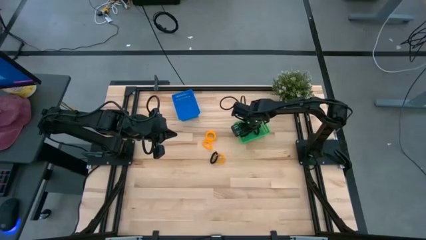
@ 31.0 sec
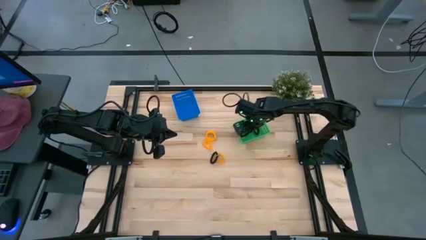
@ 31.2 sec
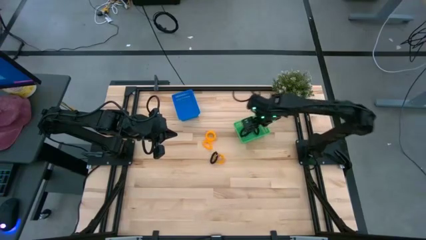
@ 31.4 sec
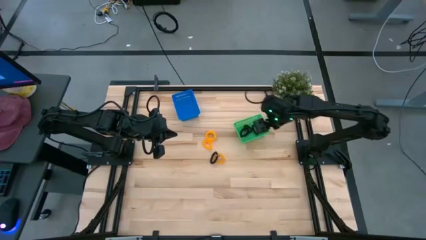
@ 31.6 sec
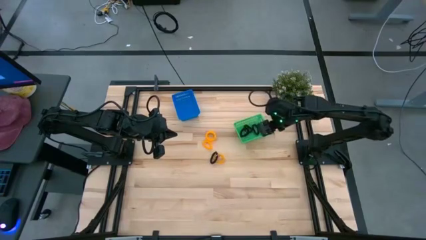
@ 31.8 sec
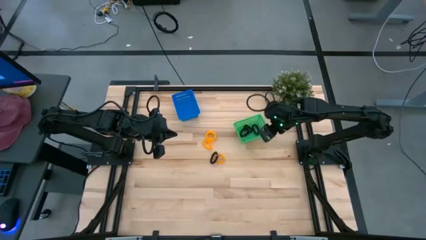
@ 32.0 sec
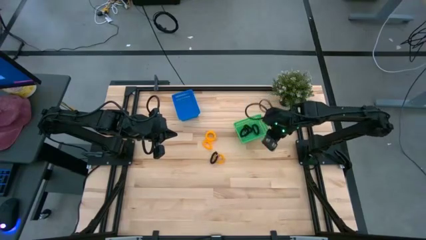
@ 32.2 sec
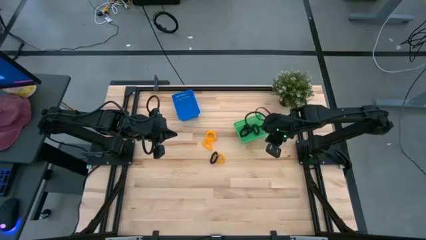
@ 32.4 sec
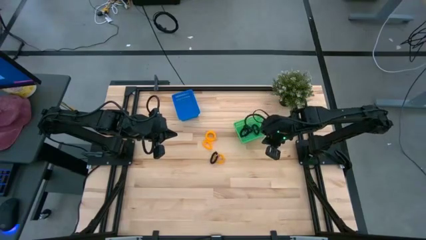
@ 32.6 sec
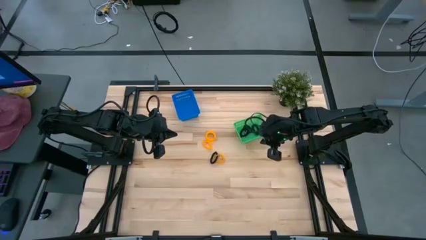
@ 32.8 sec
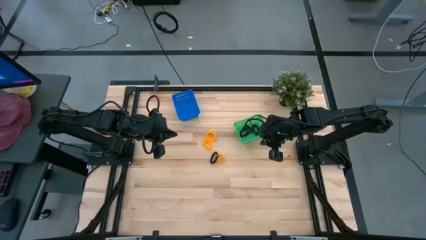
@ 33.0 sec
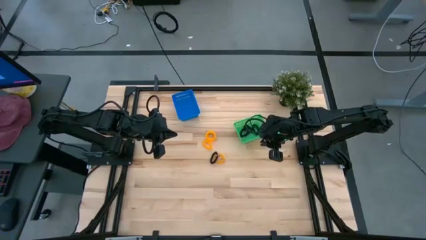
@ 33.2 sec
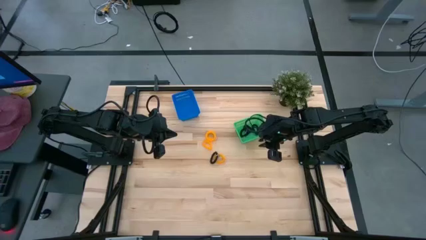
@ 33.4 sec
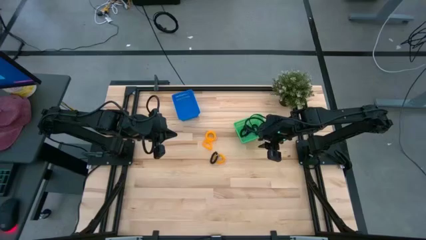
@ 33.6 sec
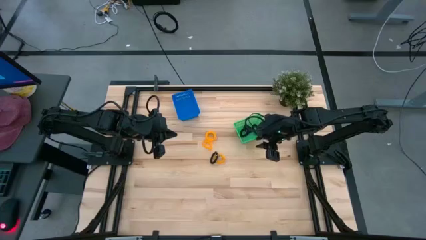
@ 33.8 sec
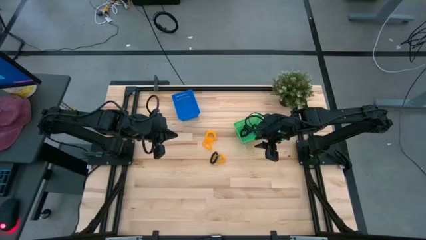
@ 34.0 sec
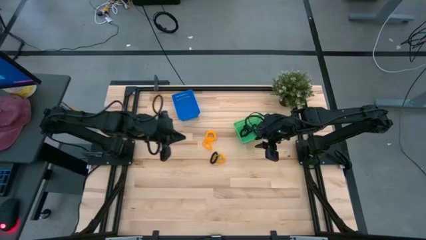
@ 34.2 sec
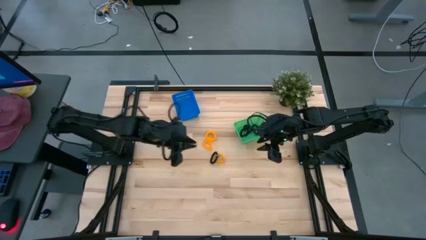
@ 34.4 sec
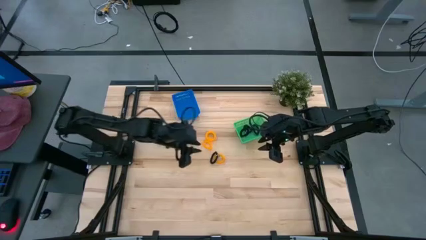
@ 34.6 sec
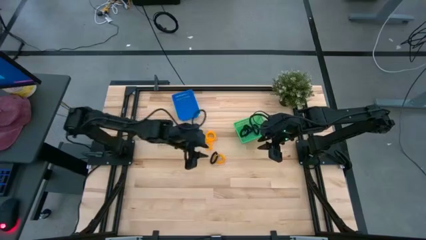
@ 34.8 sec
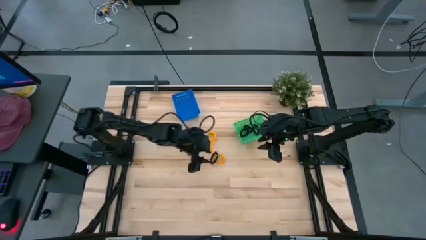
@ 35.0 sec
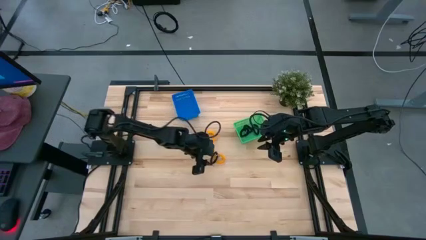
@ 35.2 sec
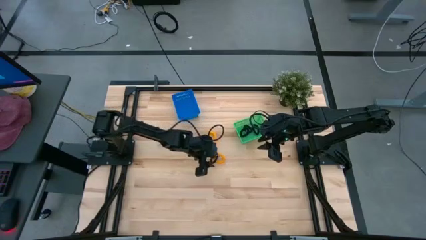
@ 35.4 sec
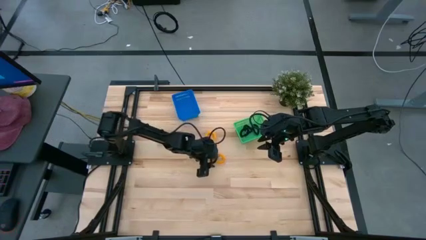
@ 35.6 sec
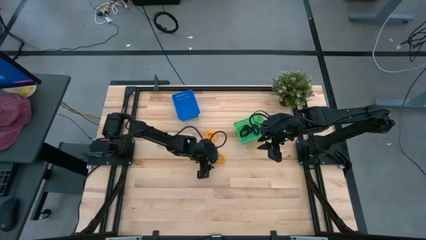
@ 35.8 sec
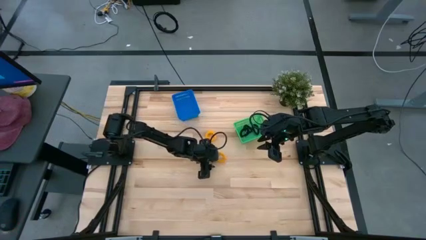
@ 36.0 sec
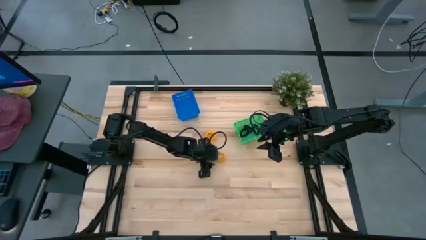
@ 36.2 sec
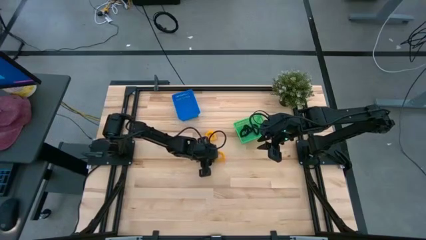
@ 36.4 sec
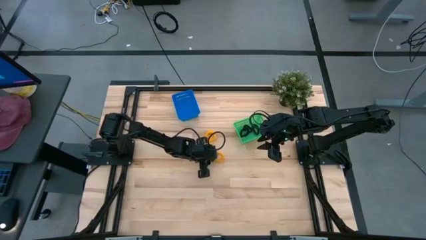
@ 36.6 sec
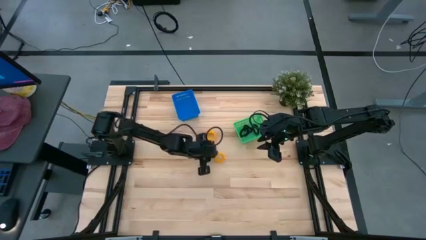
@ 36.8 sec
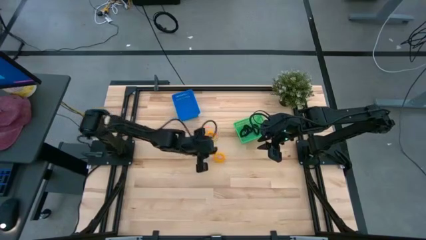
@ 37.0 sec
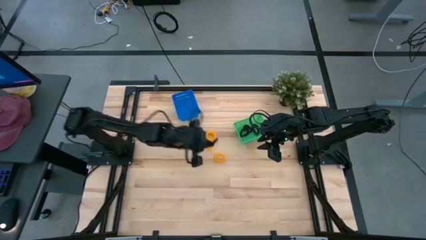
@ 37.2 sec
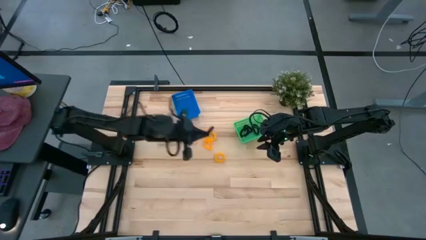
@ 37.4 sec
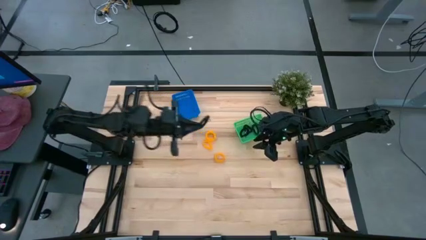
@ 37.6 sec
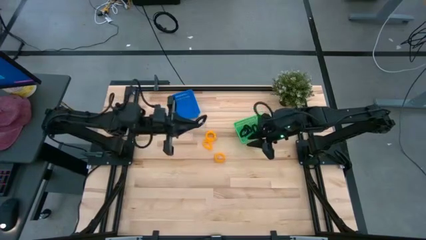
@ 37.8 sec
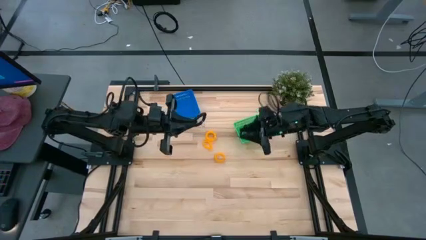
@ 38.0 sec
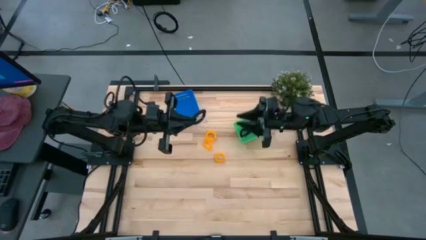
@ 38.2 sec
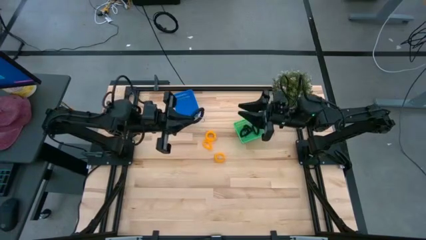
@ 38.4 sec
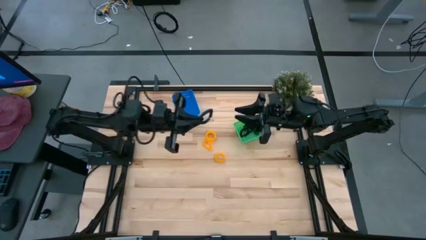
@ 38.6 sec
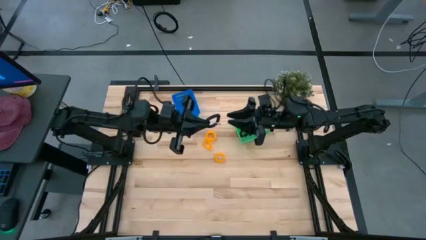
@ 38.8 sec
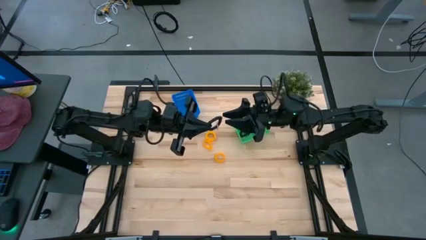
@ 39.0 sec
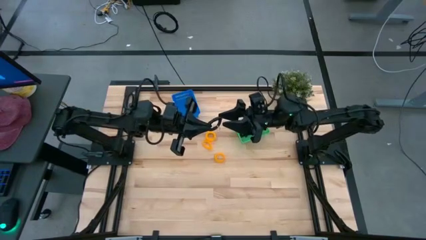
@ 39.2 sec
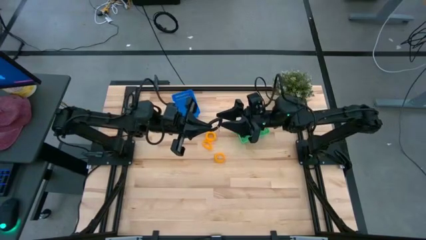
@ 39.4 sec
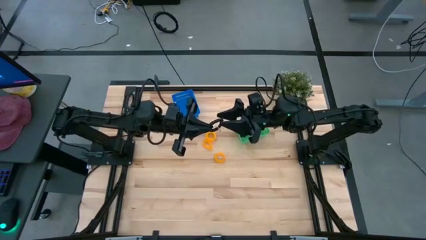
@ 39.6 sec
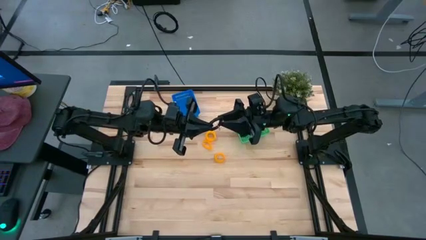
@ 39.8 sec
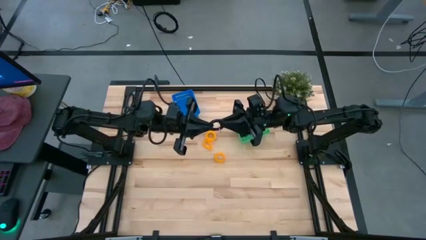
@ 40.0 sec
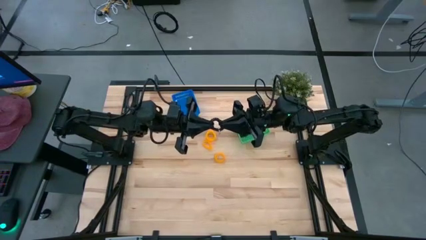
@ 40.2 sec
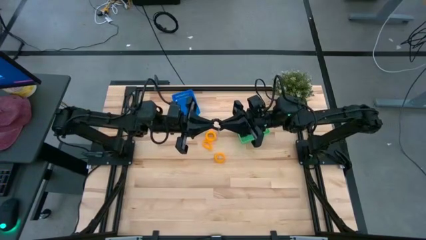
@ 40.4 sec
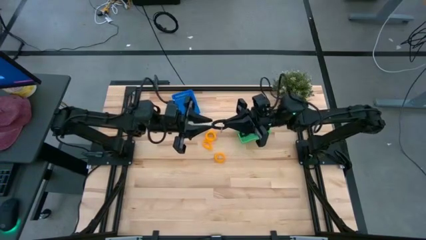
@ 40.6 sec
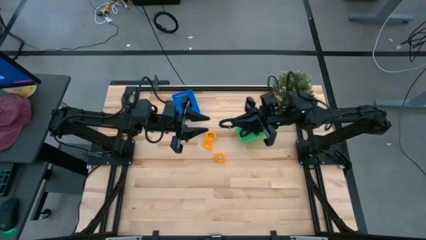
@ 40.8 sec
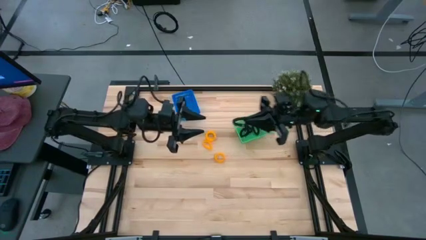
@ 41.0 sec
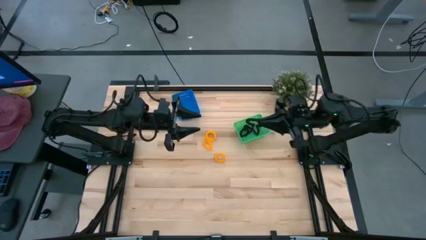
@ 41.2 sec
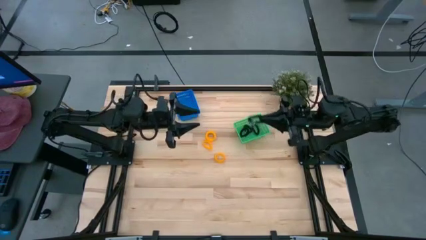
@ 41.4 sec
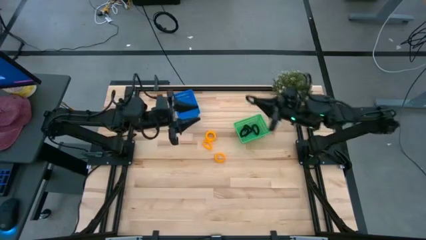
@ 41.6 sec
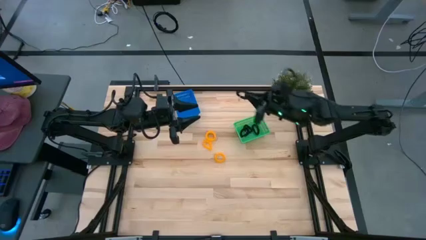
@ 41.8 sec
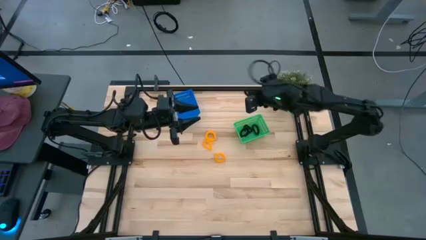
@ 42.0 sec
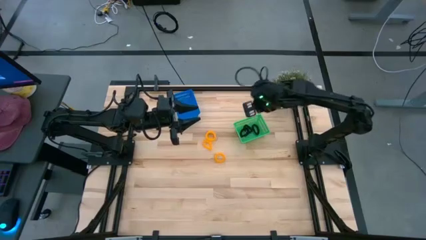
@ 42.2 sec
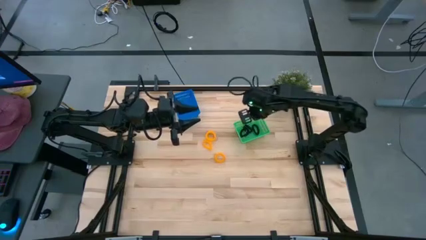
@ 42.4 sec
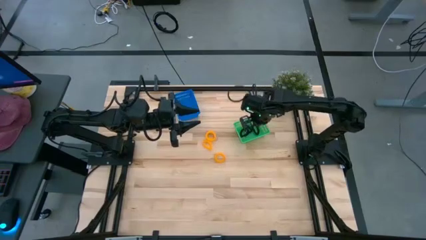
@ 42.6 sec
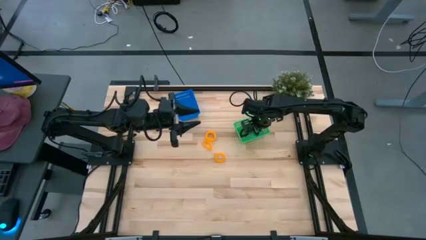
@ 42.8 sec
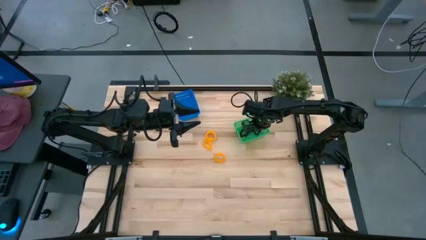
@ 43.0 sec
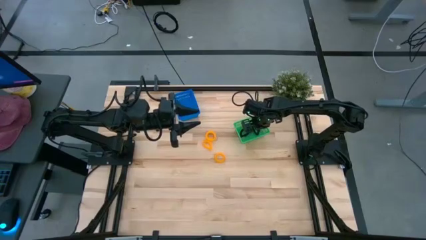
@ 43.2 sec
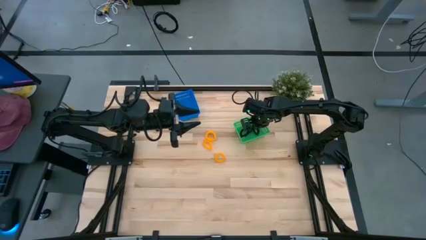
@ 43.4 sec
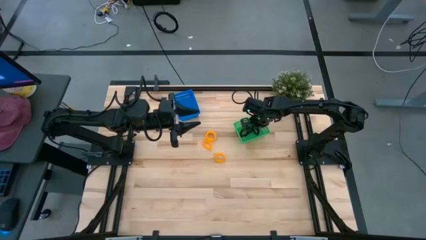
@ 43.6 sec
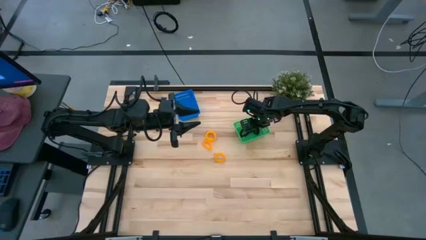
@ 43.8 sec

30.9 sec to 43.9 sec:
Task: Sort spring keychains
Put the black spring keychain into the green bin
